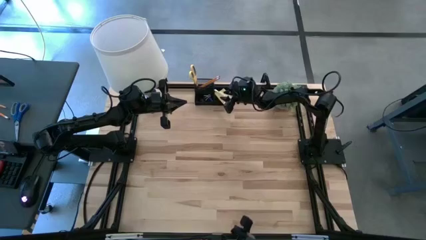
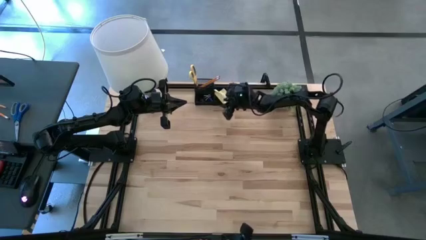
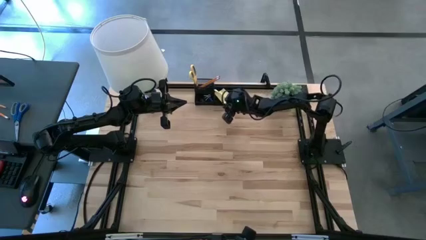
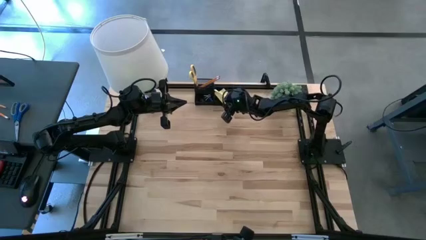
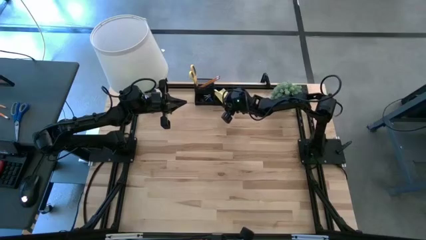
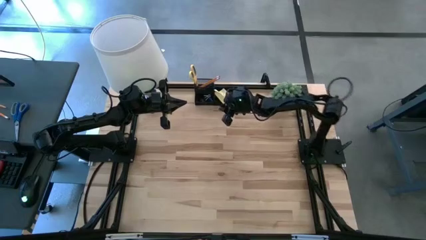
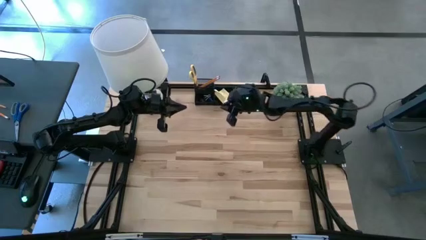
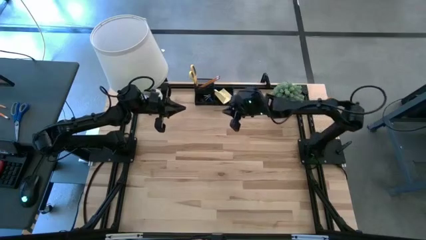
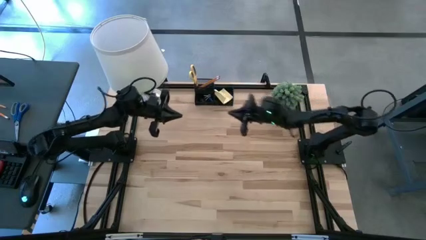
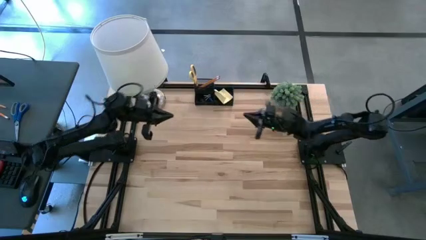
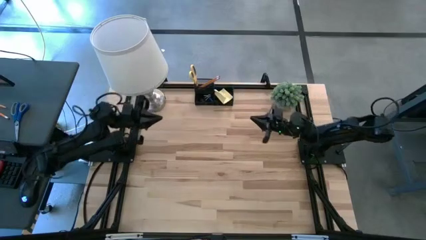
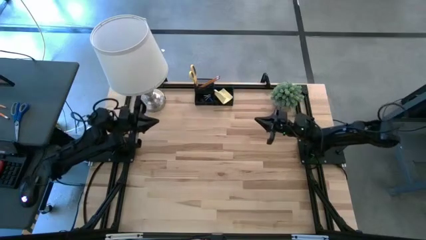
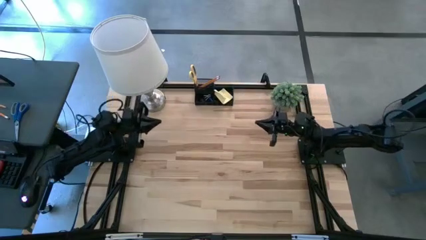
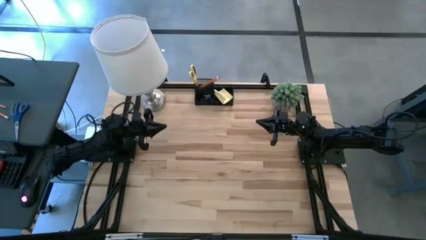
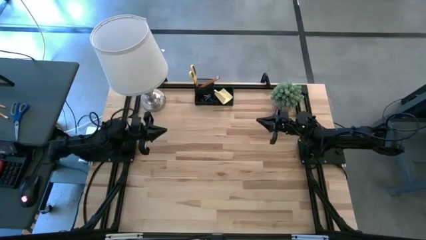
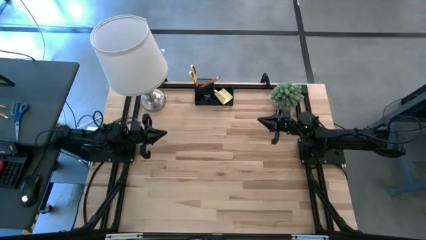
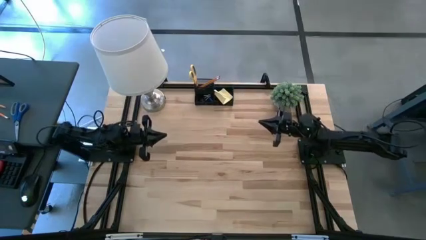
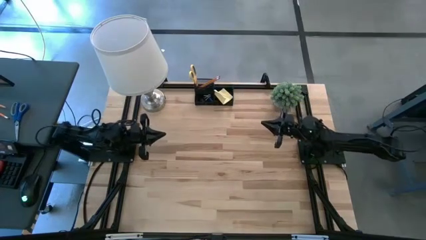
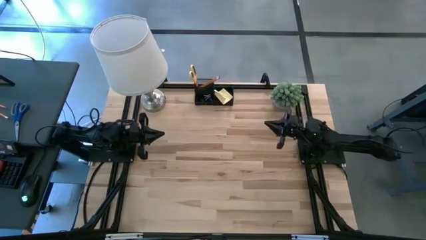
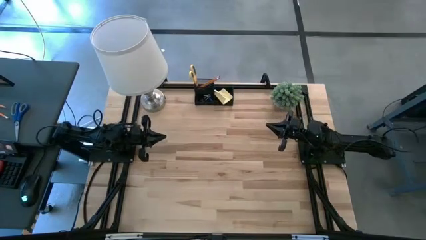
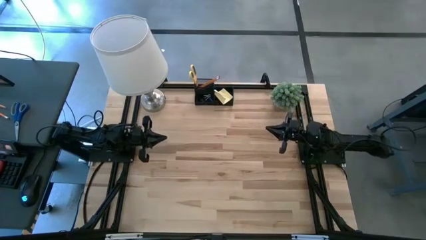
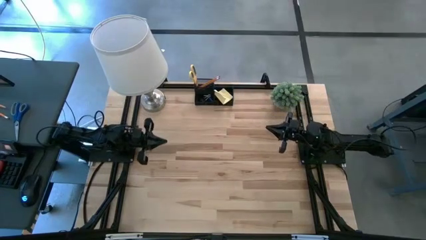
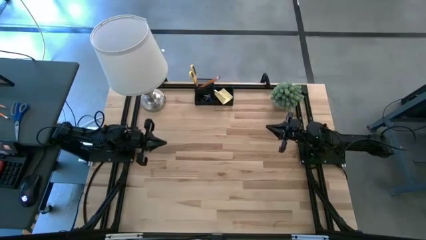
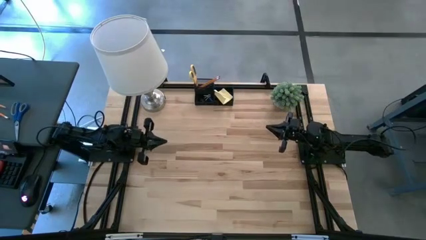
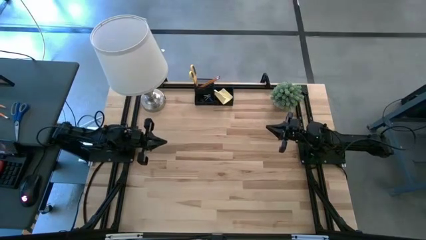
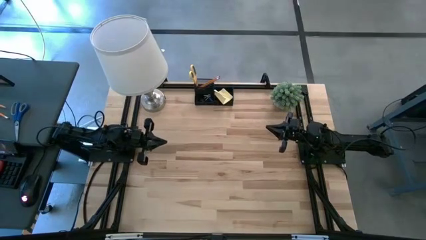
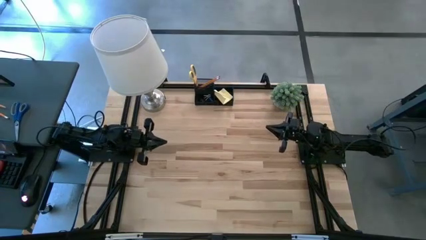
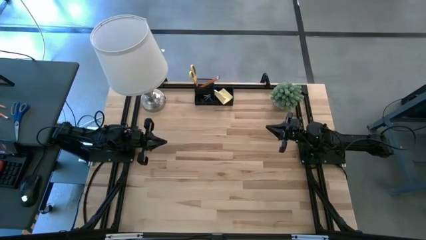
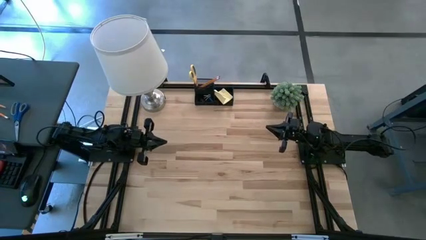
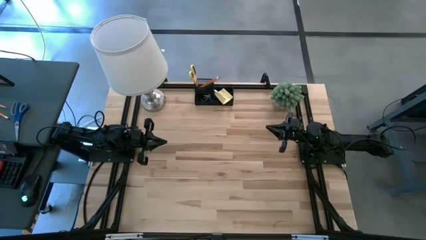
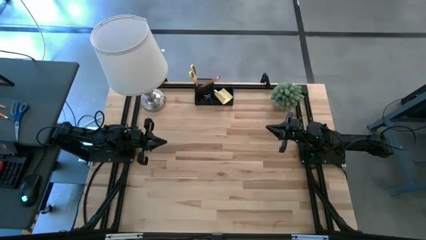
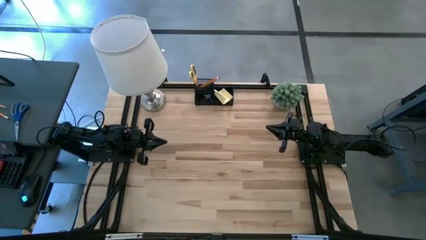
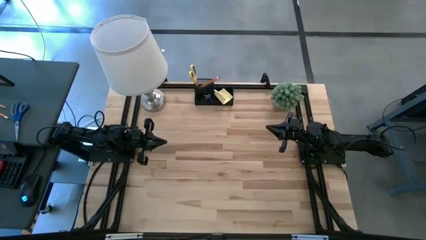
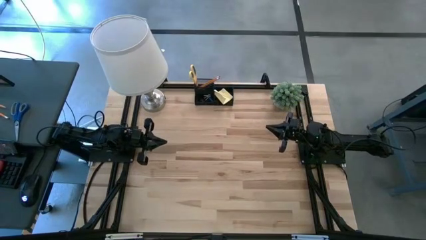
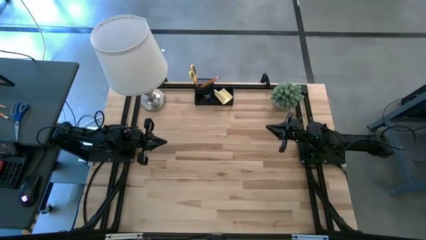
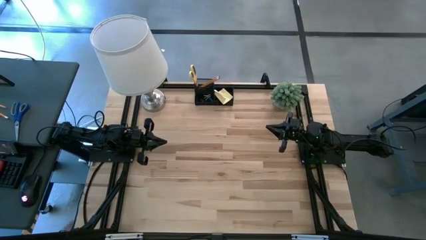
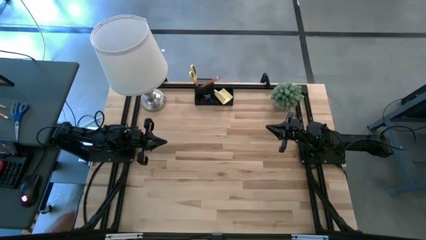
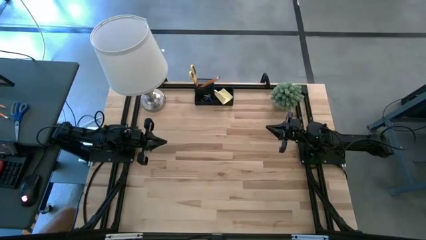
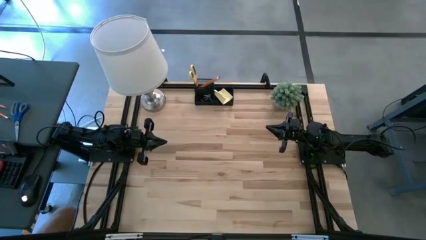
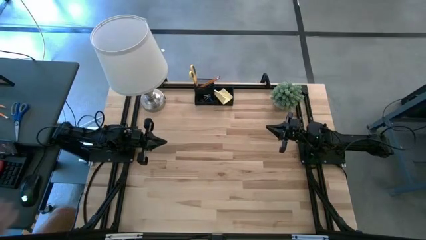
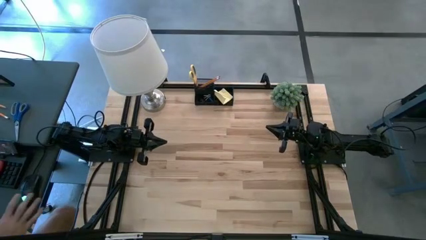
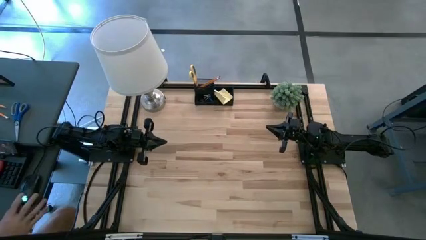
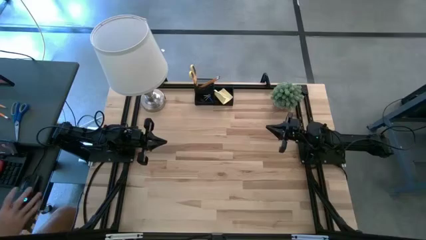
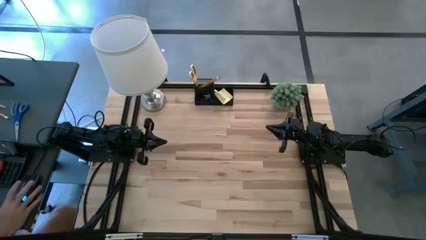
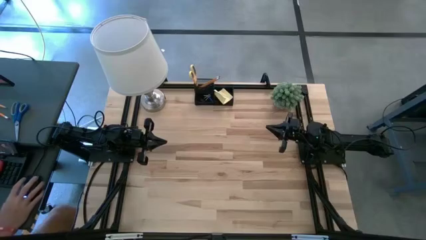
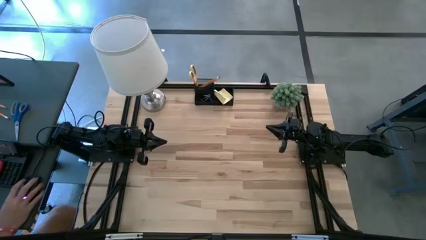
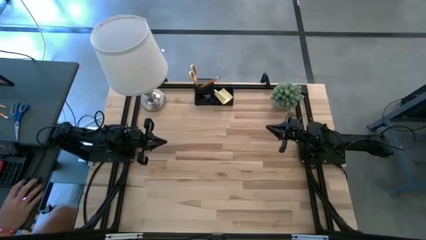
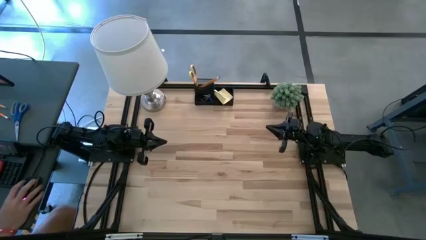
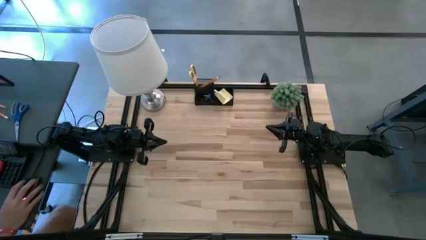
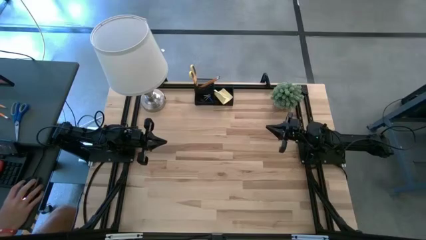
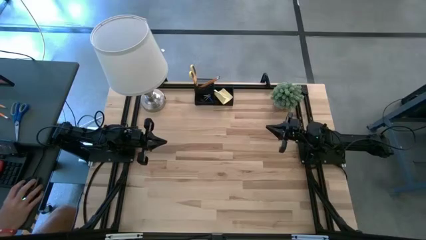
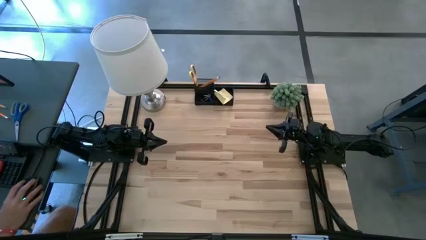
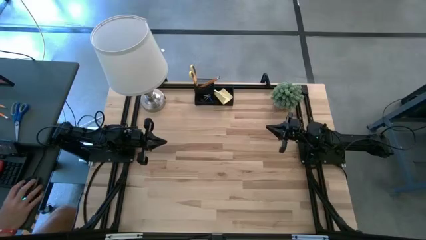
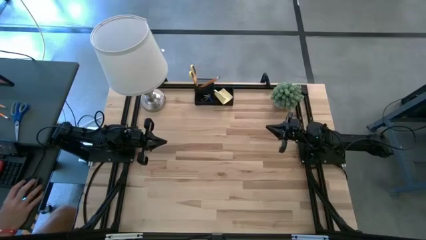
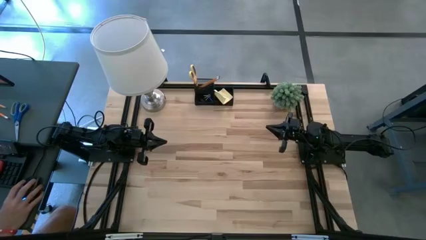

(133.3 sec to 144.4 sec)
Task: Pick and place office supplies into organizer
Return to Home Position

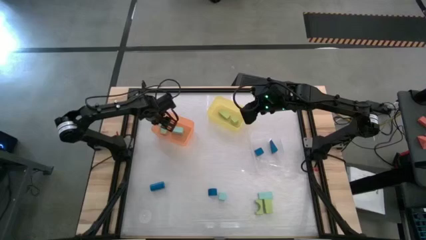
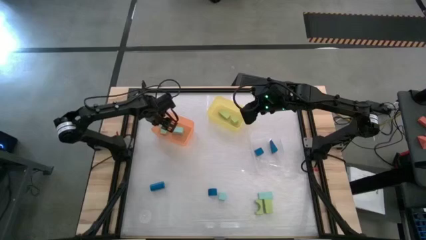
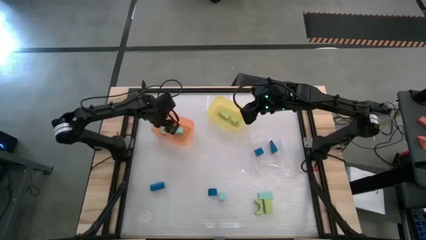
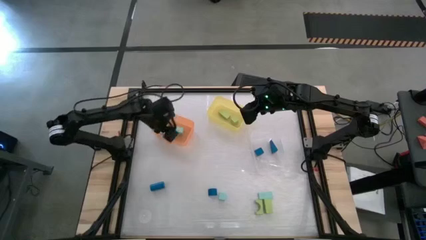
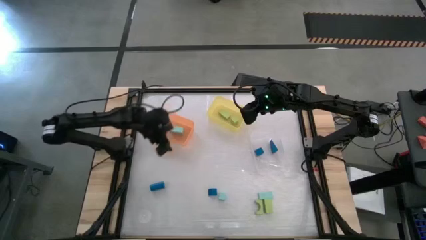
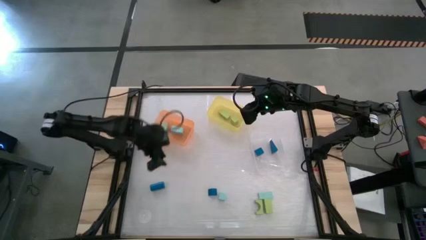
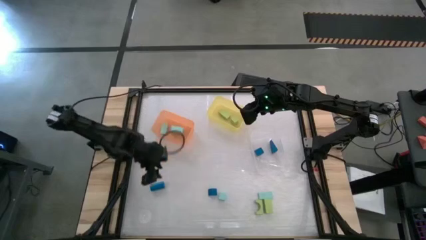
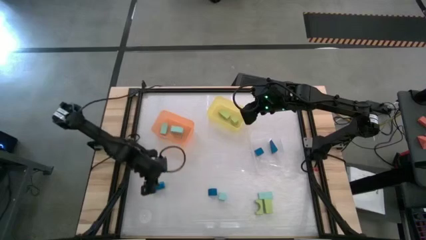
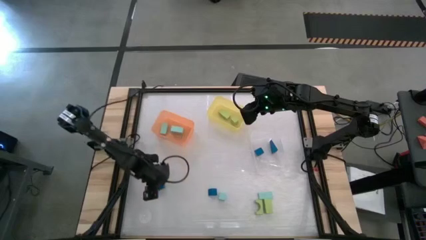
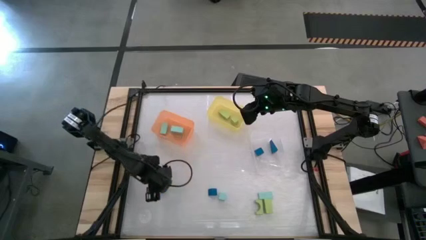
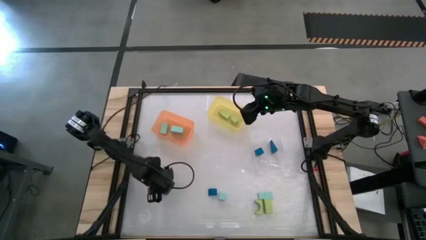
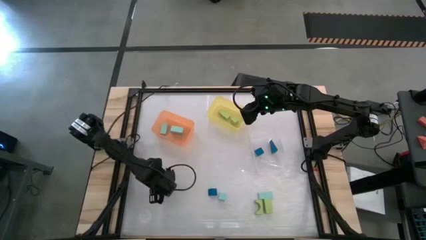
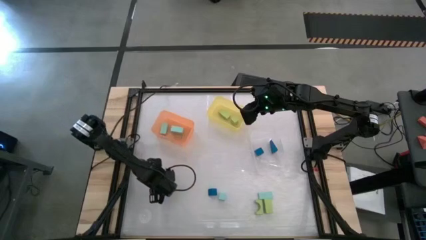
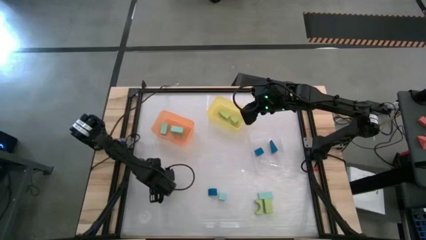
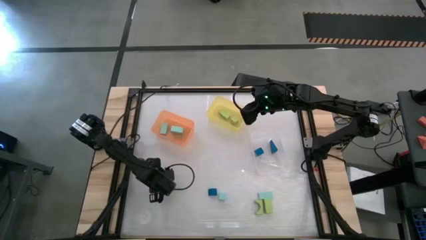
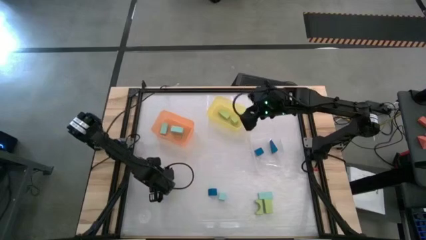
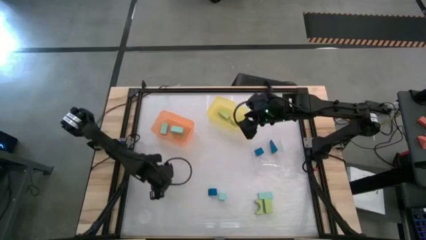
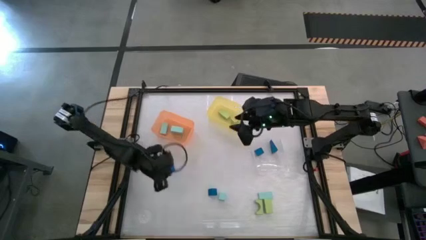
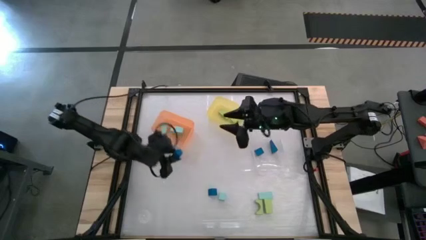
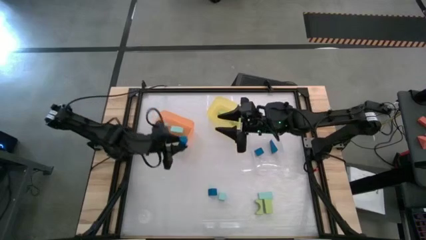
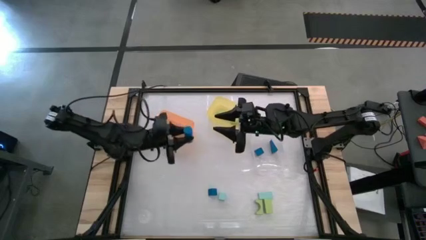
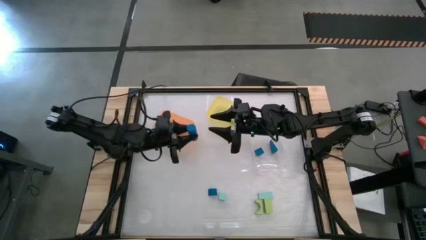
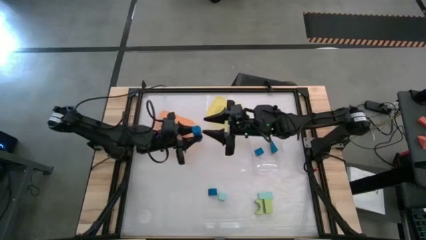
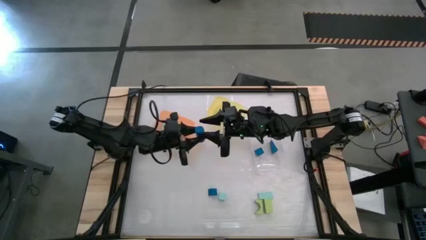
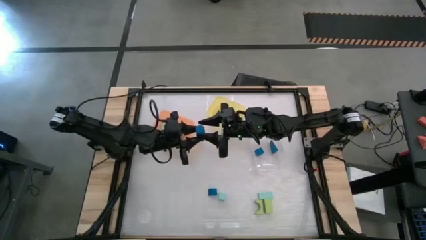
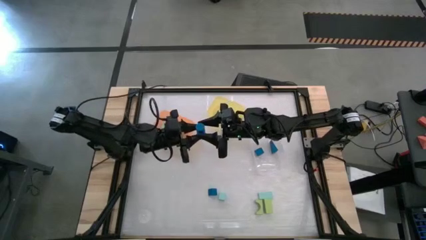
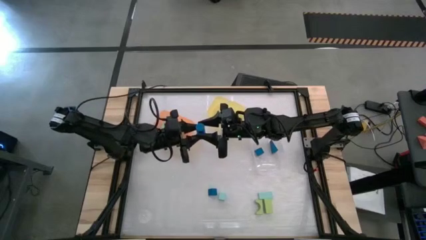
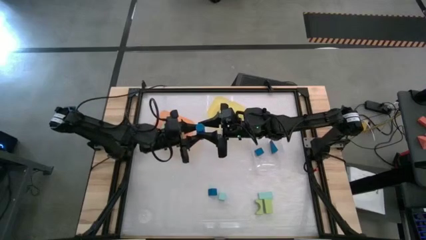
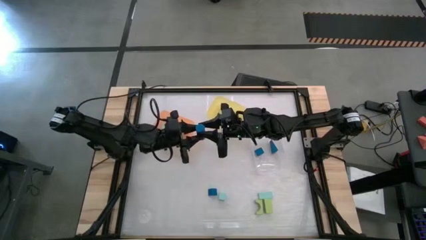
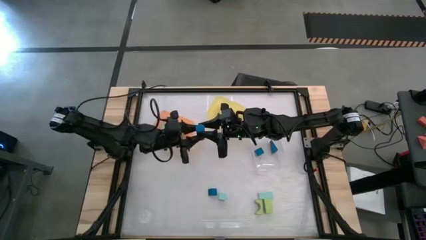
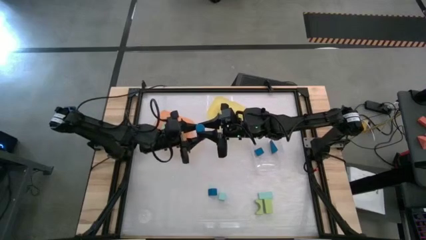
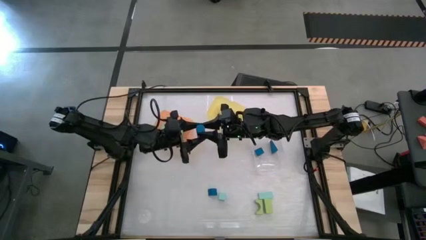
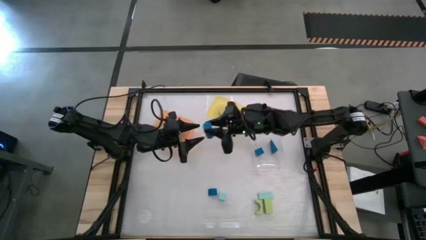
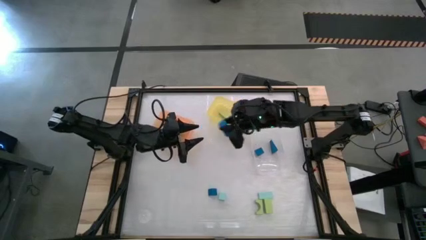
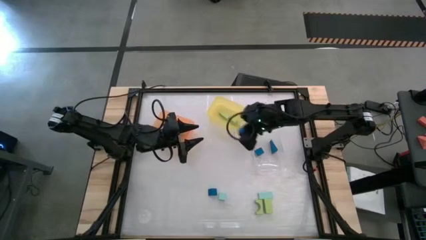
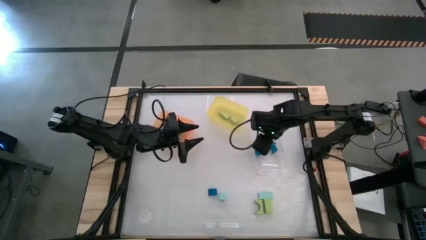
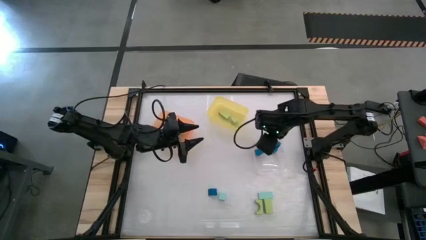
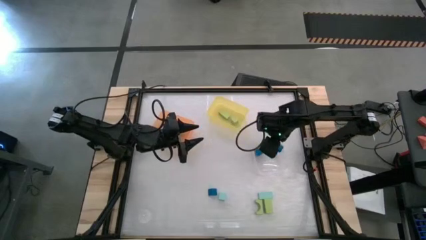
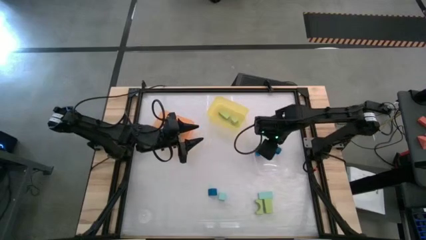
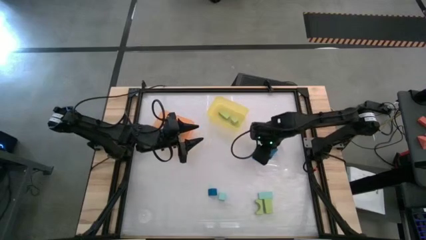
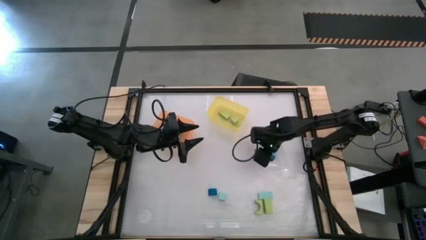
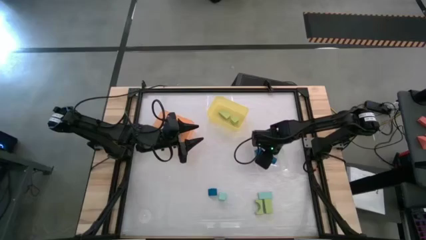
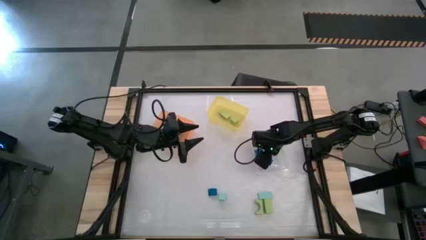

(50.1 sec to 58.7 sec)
Task: Sort & place blocks by color
Put the blue block into the transparent bin
